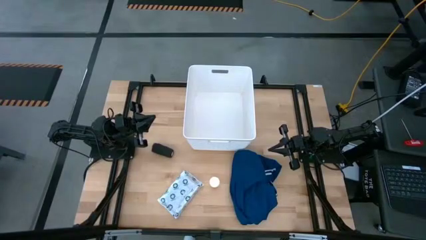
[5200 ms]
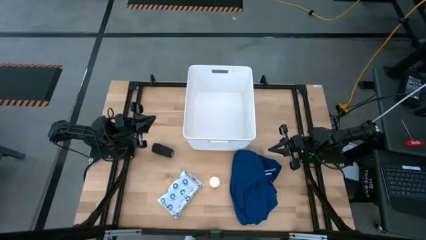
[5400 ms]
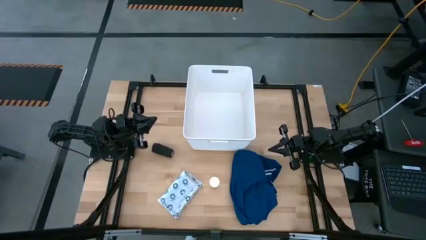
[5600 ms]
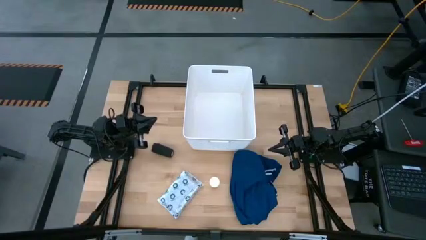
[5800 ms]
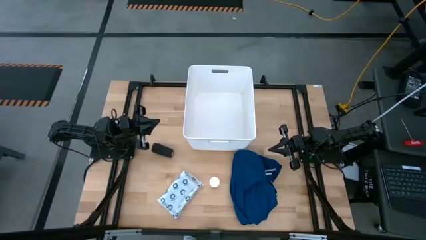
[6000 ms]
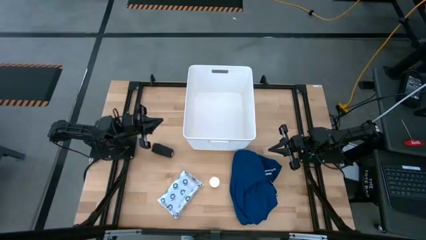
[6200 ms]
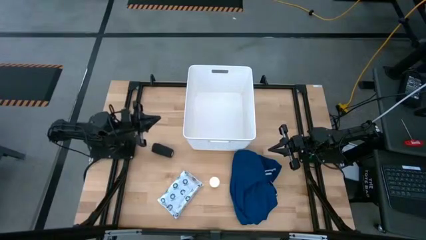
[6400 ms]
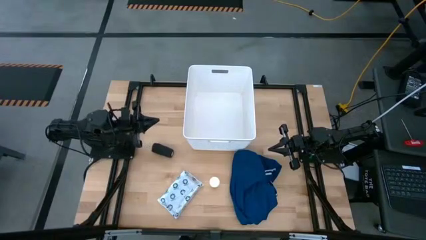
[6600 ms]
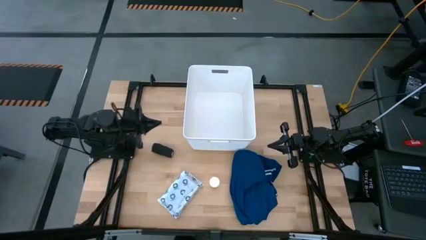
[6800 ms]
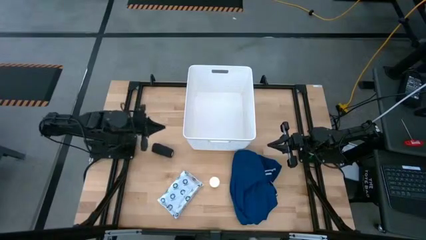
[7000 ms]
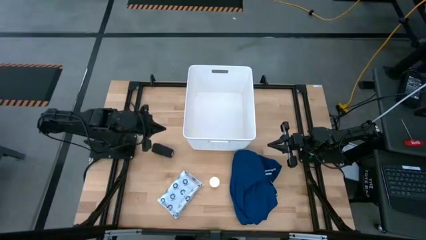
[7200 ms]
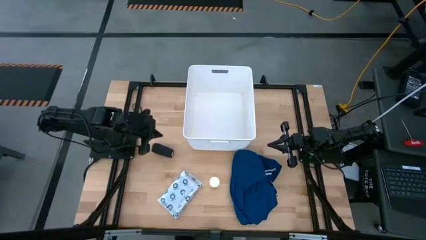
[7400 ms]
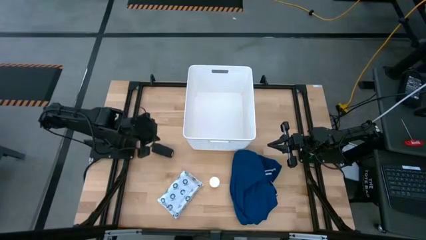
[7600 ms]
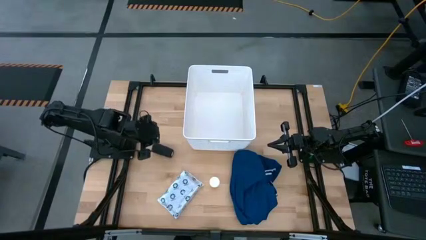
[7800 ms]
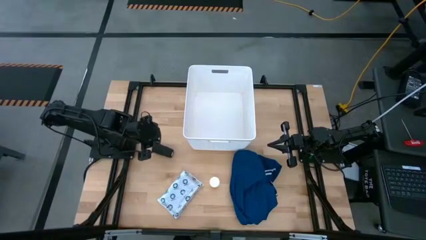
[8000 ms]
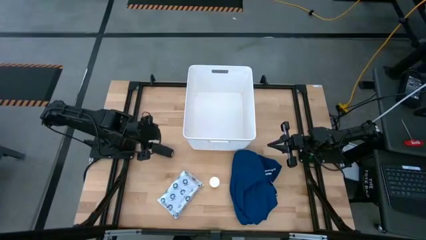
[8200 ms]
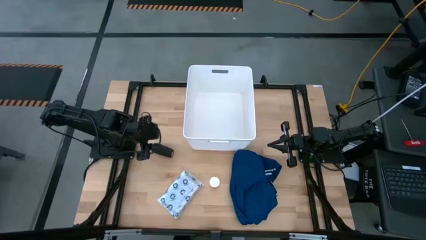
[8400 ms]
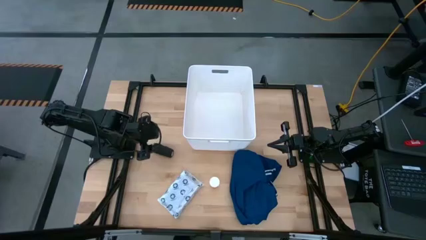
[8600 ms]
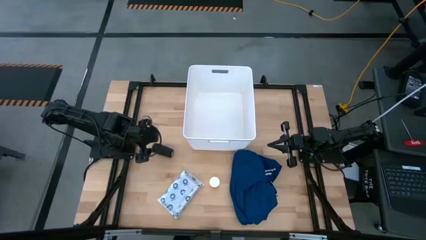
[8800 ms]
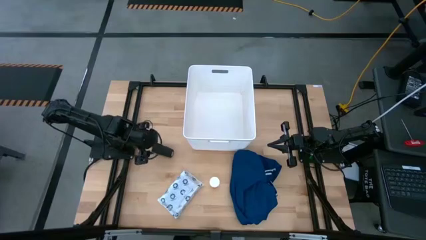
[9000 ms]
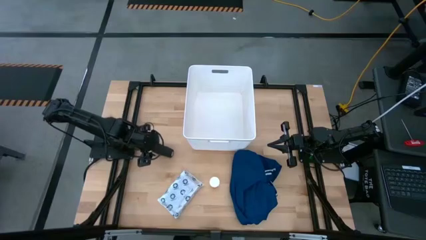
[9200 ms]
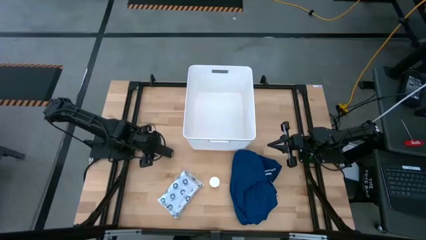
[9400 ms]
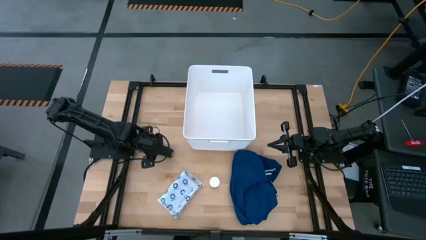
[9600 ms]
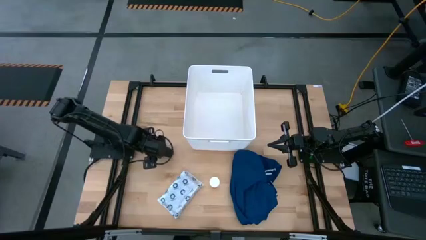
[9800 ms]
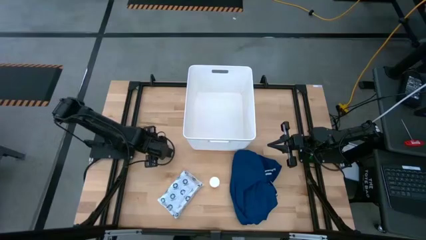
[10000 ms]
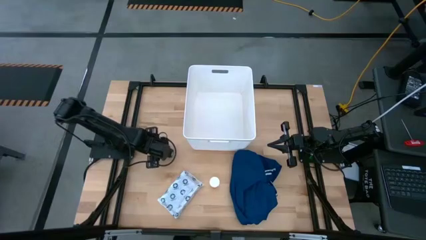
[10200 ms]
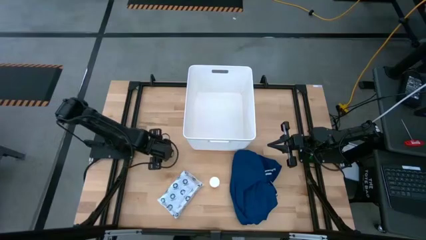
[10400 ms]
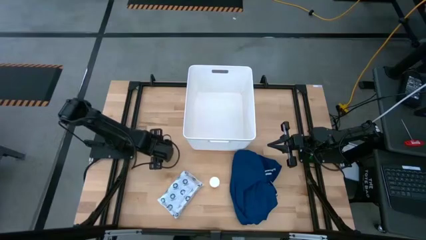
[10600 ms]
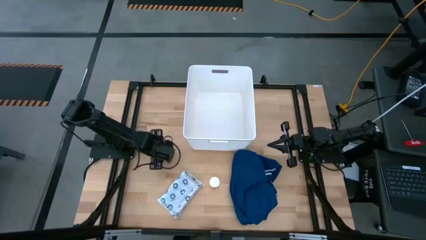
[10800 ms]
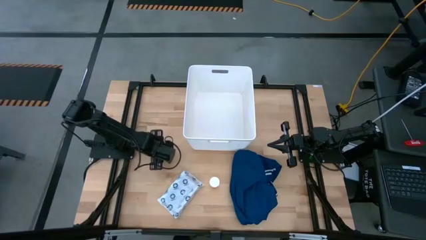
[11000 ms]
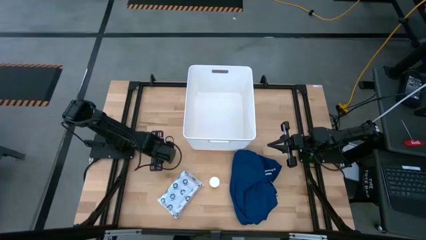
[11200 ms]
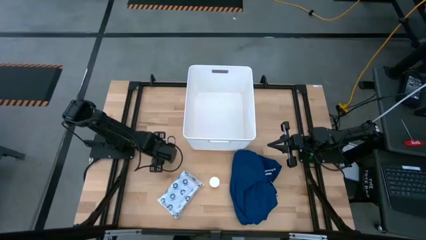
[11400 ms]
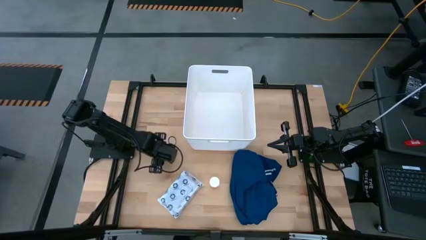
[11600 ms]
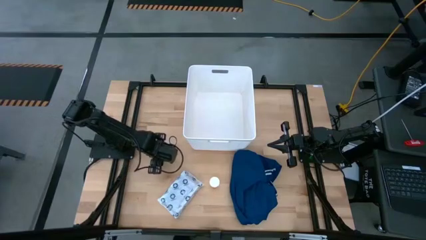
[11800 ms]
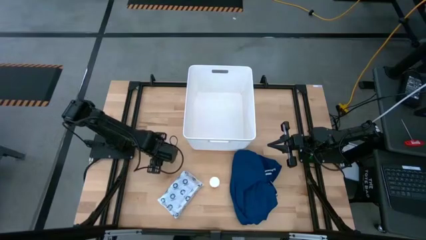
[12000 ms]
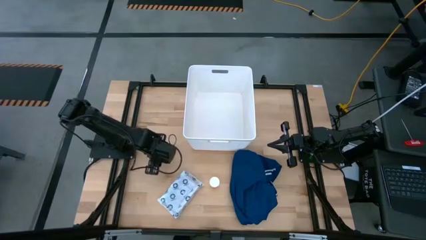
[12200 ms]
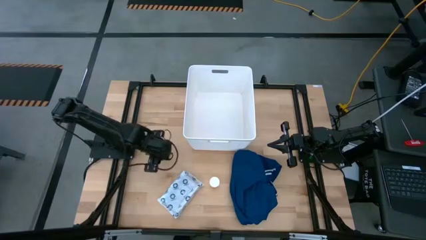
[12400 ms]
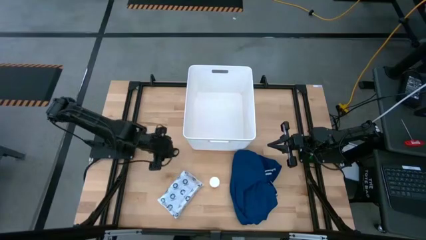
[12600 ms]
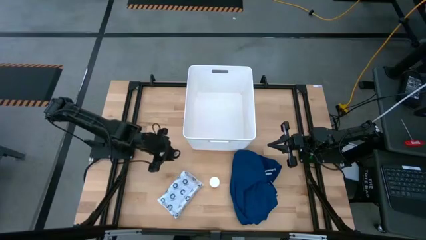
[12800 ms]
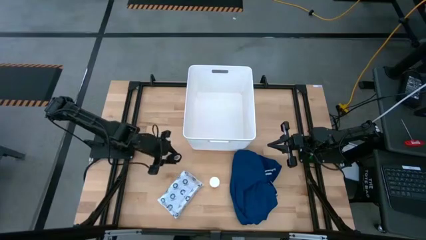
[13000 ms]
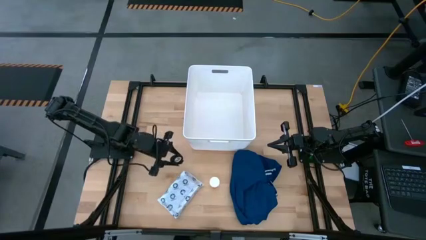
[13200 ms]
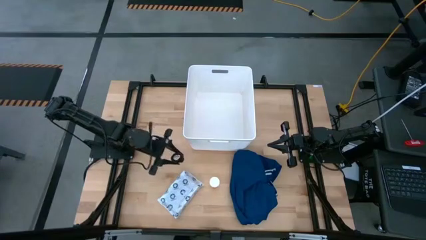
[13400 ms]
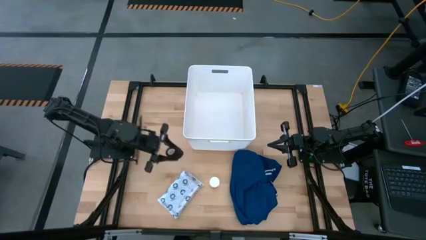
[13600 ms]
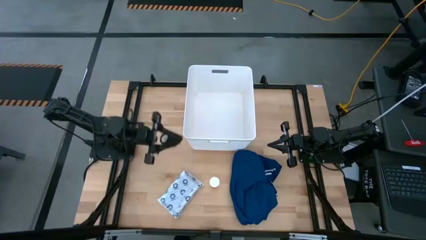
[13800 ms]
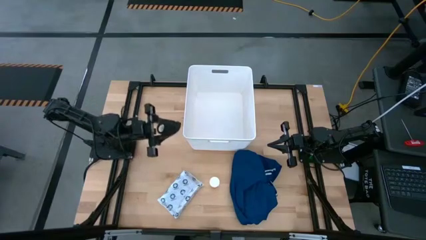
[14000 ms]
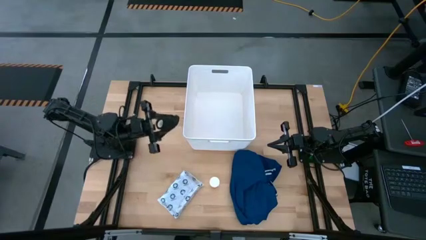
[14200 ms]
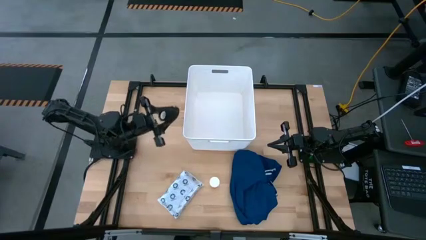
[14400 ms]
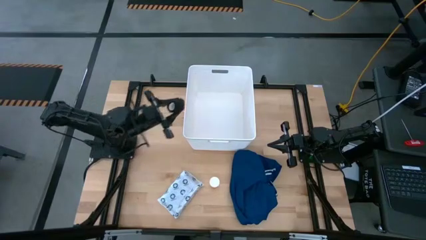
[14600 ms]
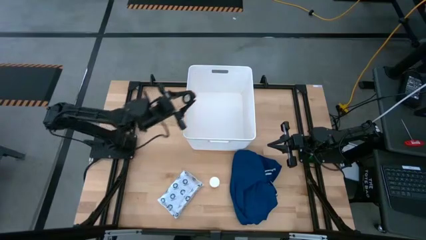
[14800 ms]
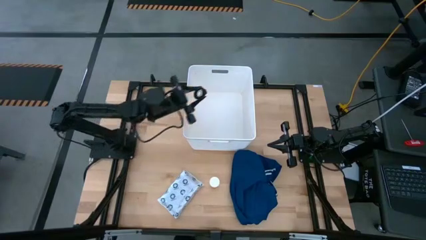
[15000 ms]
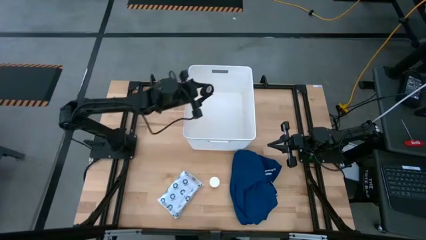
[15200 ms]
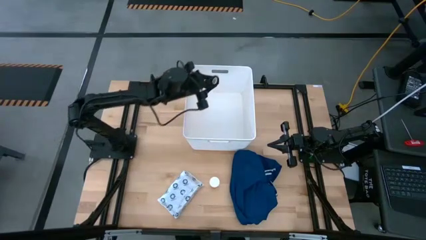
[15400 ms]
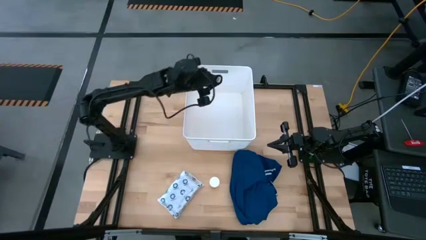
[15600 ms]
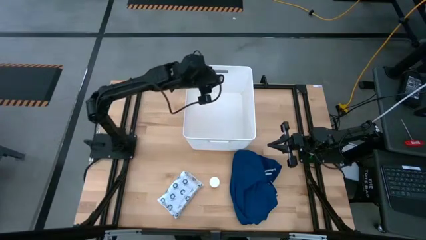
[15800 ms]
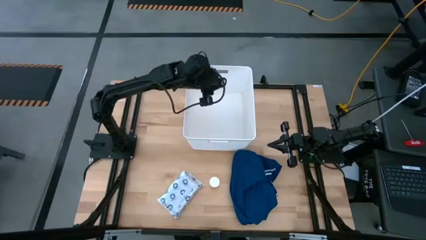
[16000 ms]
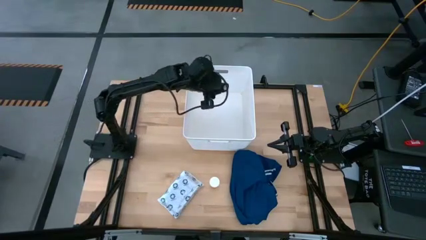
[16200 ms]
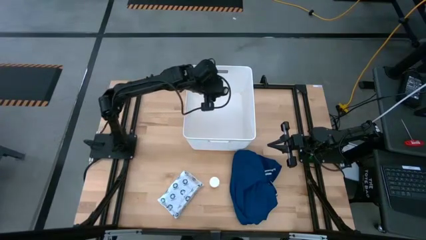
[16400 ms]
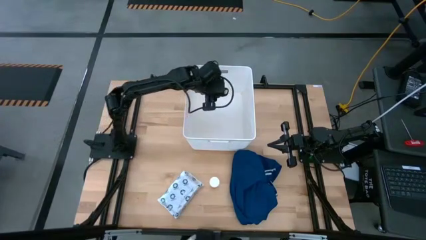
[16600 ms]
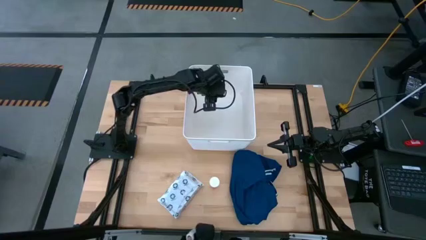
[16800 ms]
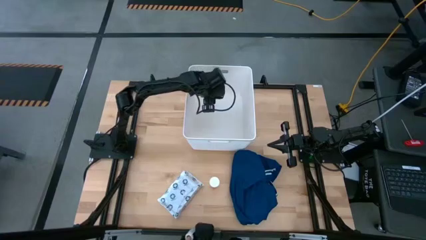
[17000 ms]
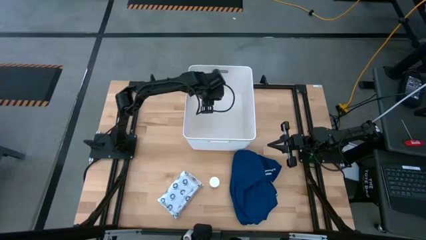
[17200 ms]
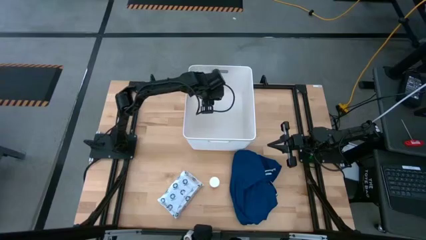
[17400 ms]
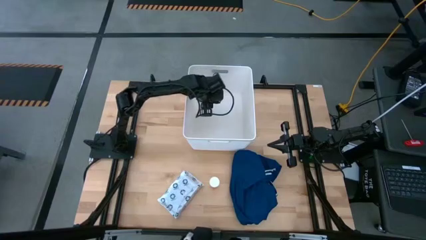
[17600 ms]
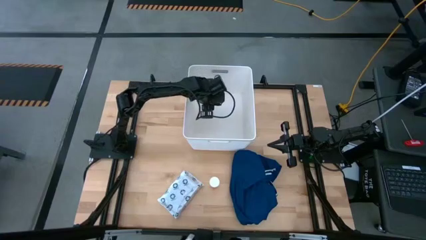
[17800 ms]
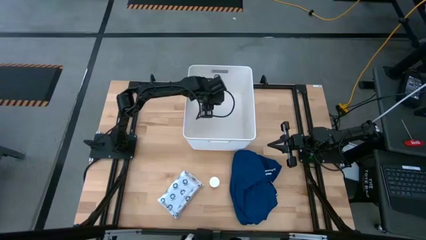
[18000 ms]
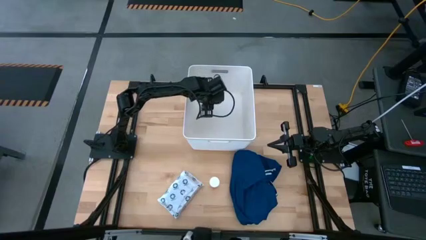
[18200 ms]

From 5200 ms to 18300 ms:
Task: Pick & place medical supplies in basket/bin
Put the black bandage into the white bin

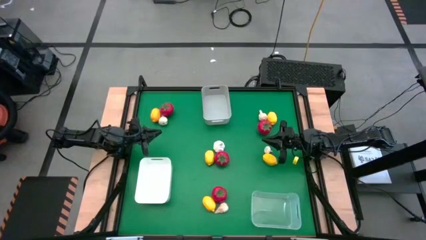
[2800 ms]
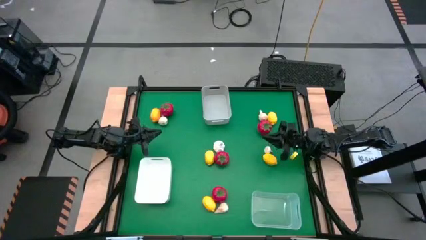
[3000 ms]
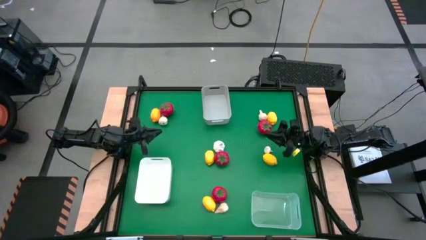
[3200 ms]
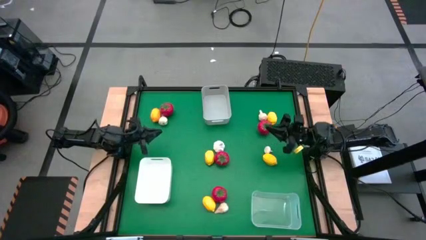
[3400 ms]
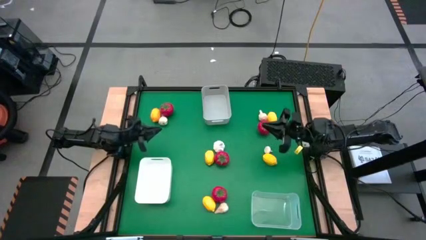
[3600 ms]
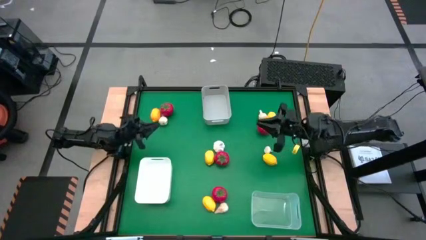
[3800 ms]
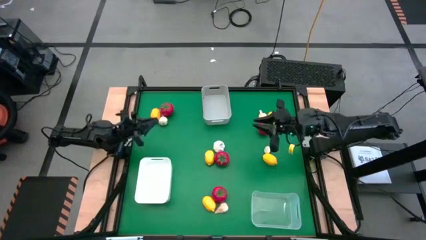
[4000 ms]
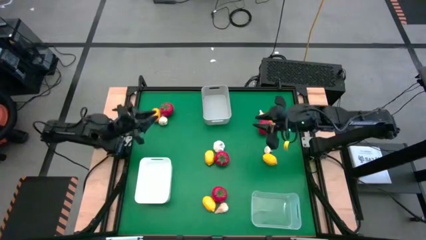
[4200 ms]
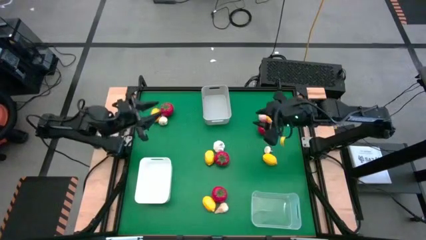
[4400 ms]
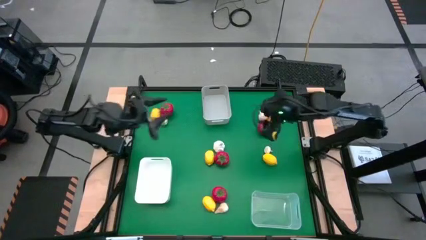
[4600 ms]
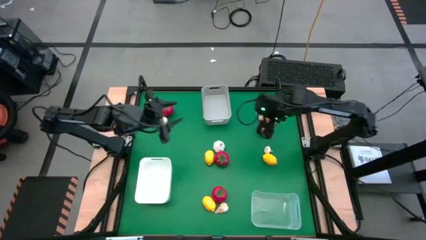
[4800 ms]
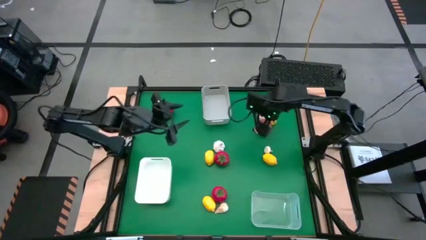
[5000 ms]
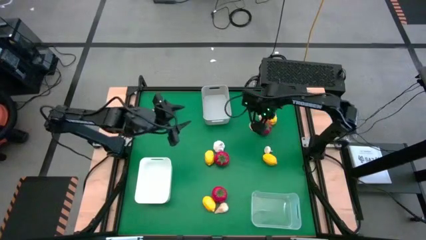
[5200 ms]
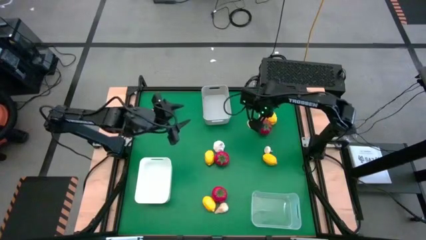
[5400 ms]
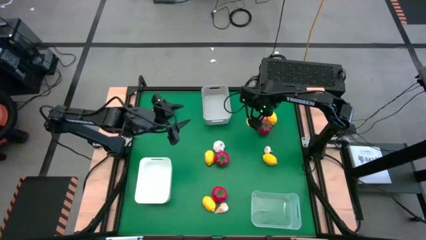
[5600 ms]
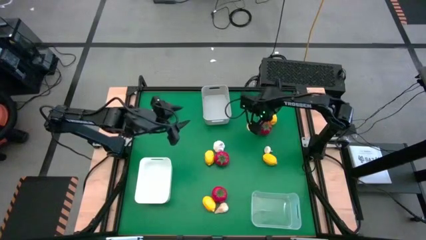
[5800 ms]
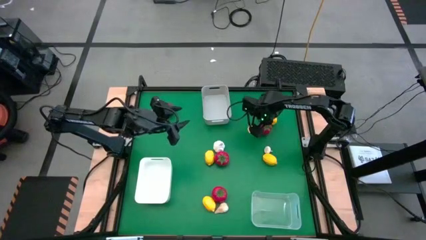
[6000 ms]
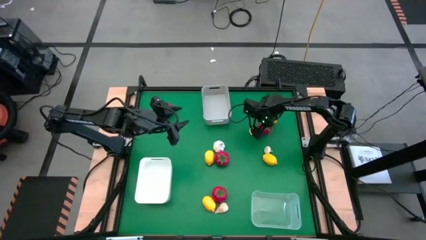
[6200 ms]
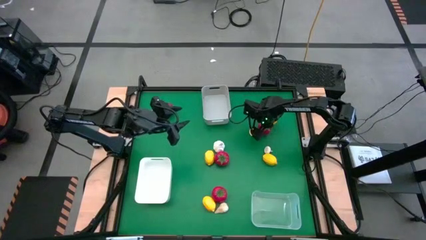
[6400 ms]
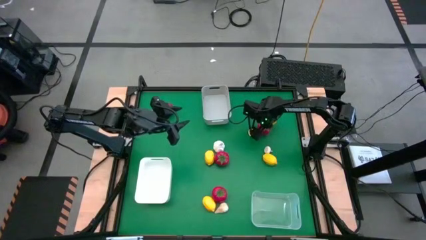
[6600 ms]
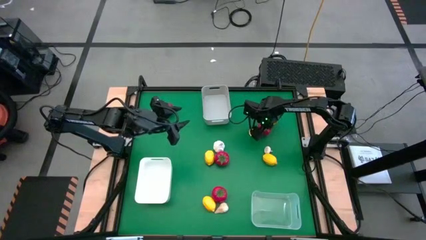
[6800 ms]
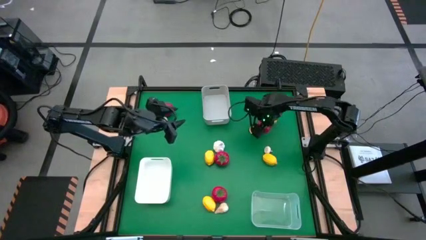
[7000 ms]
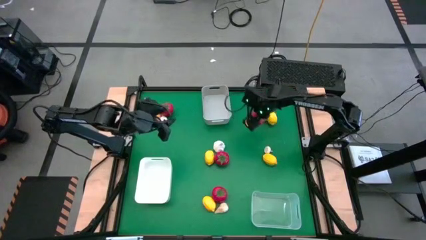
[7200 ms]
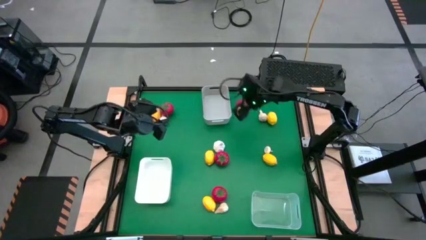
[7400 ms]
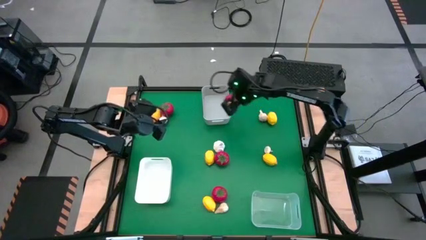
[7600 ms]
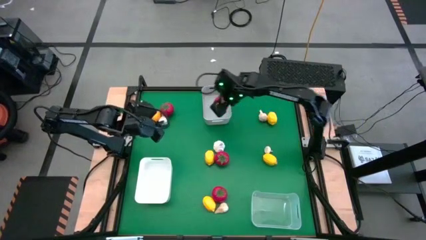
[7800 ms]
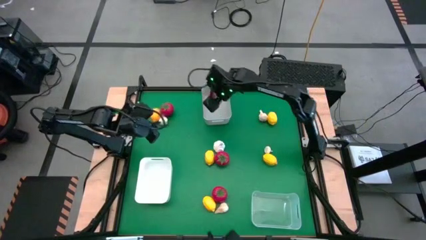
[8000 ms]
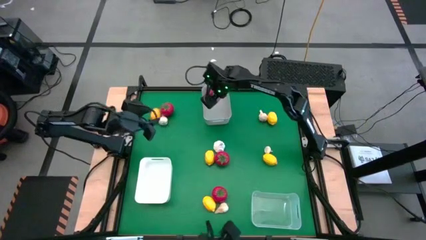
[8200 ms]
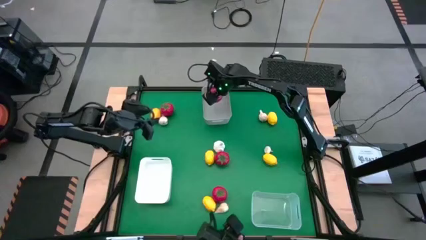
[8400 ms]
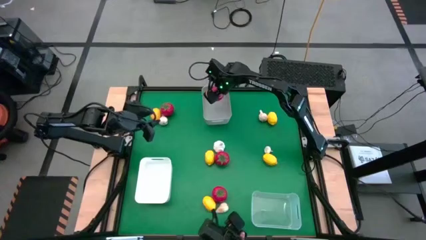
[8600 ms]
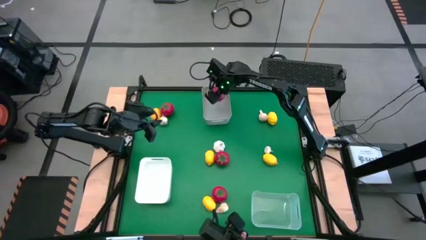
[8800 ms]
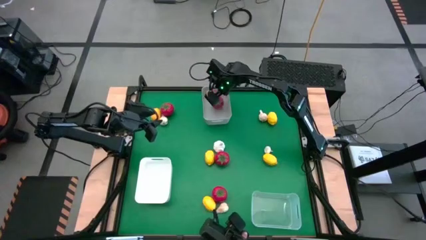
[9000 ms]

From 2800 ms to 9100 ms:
Task: Sort produce into baskets
Put the top right tomato into the gray bin
